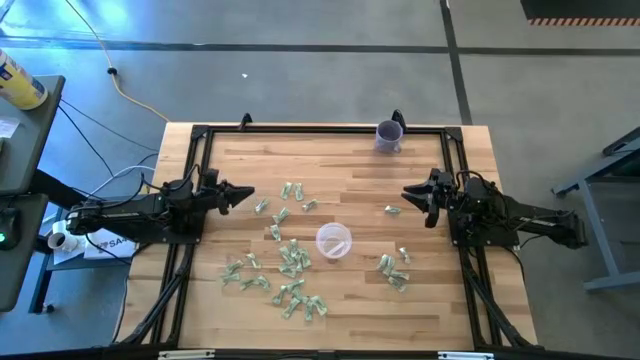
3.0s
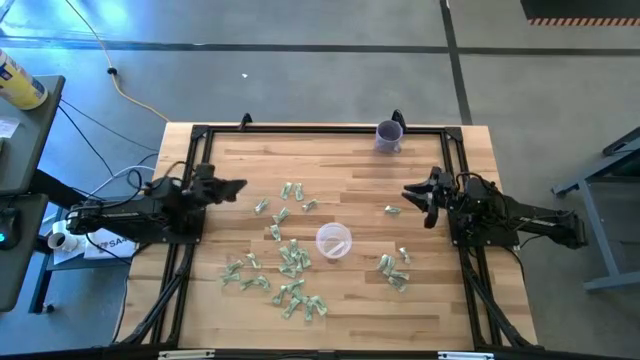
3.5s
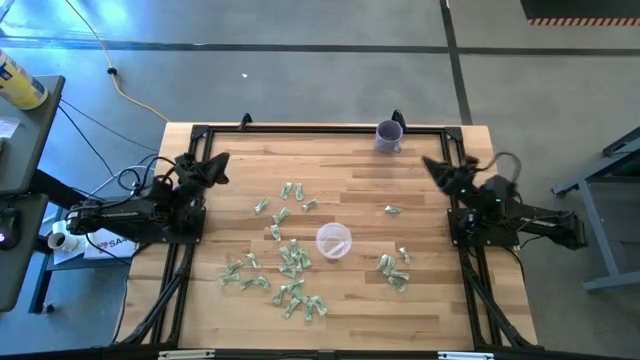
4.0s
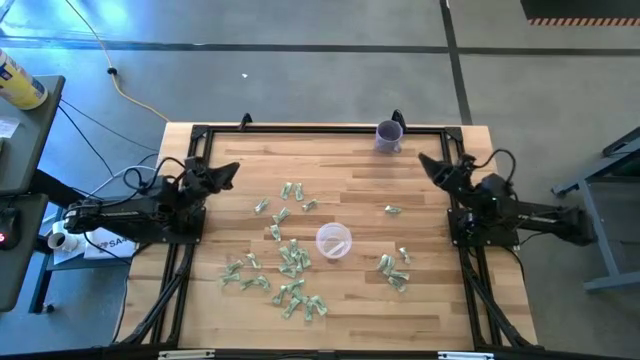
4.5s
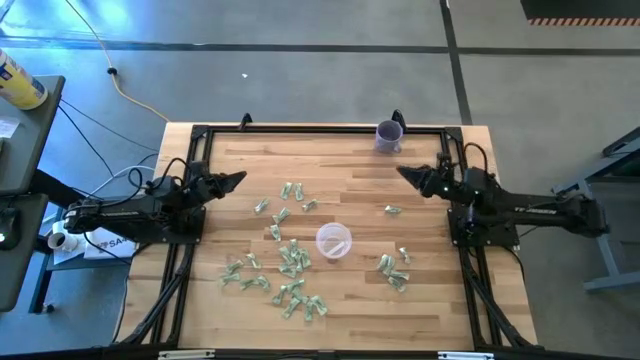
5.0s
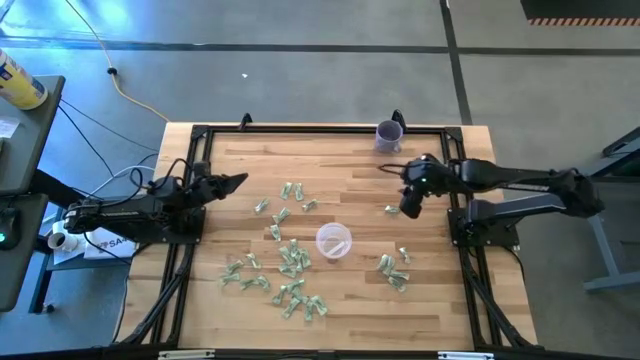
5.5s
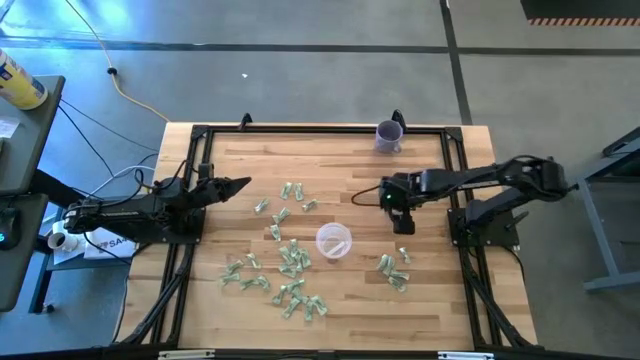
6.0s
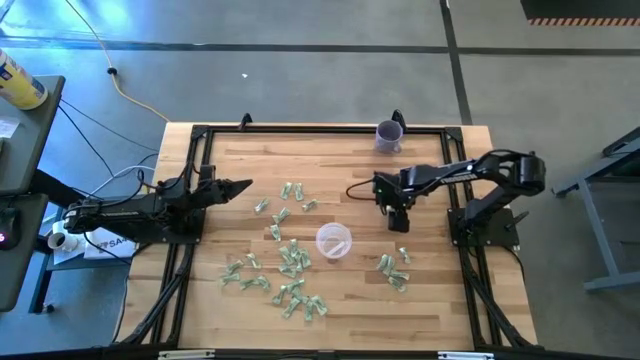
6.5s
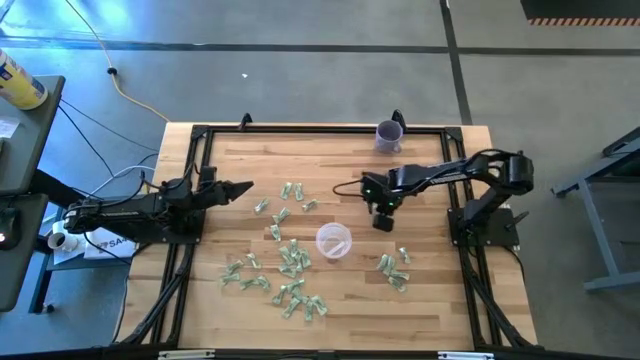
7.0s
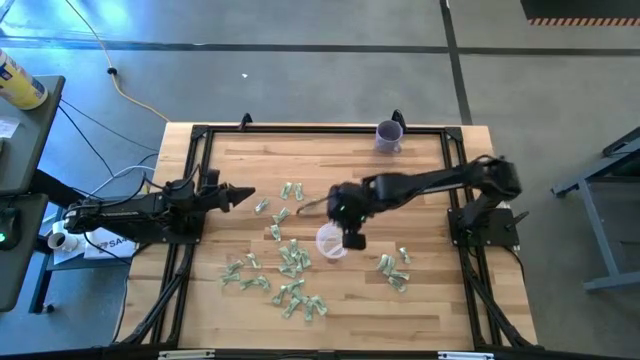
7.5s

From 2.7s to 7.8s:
Task: Pick and place Stevia / Truvia into bins
Put the stevia packet into the bin

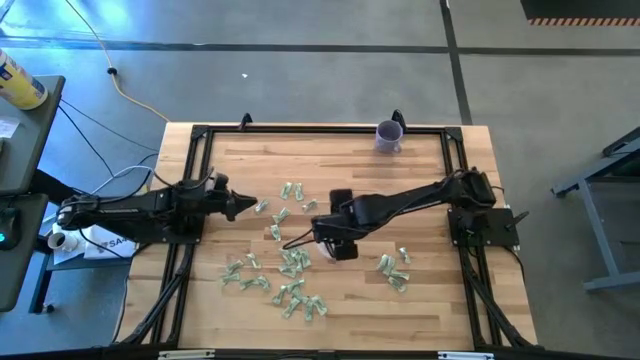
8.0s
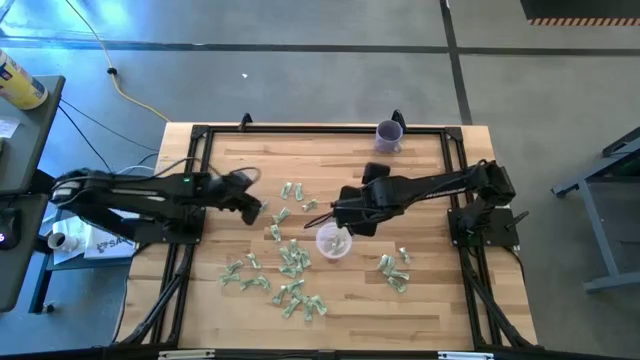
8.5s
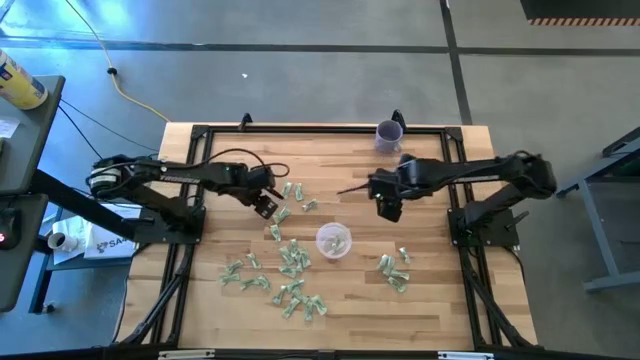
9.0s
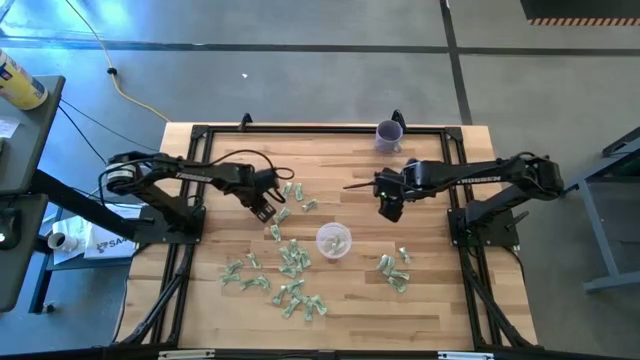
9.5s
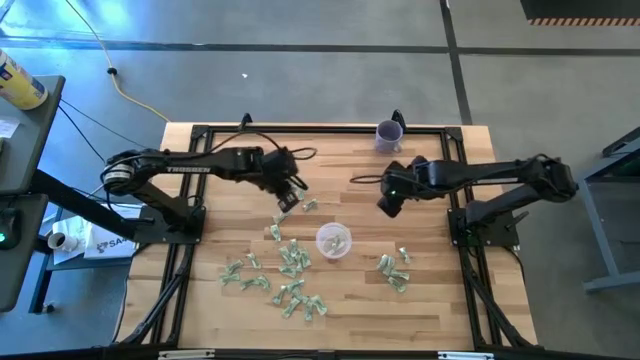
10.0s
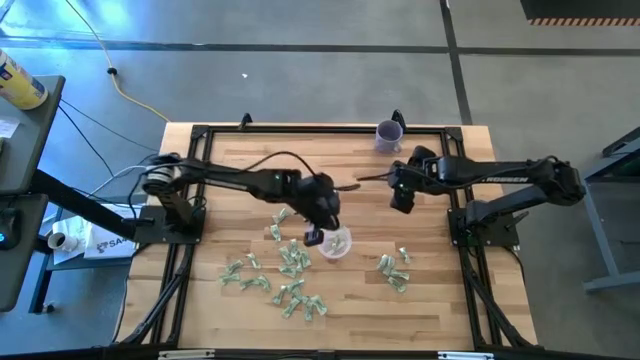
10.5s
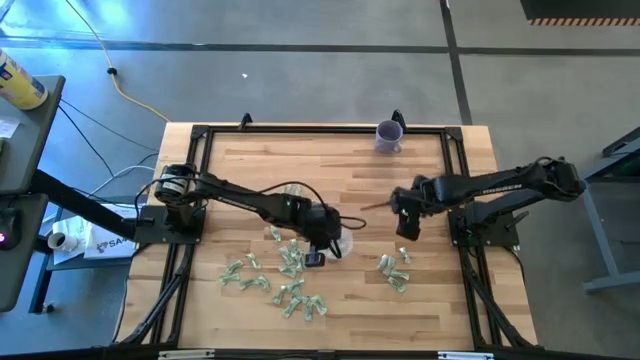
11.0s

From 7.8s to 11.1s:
Put the stevia packet into the bin

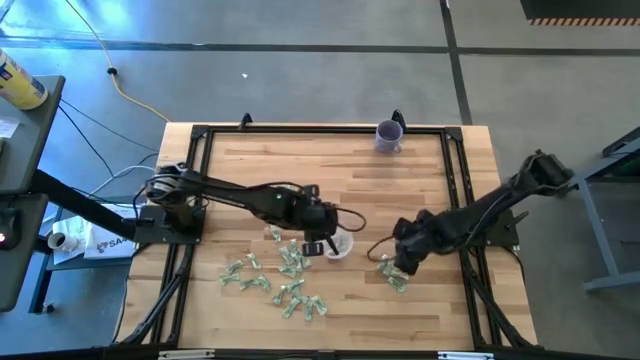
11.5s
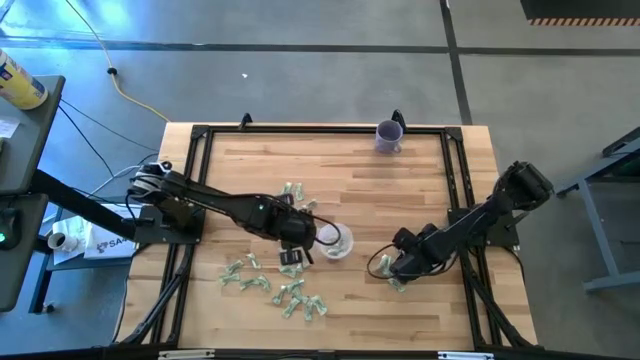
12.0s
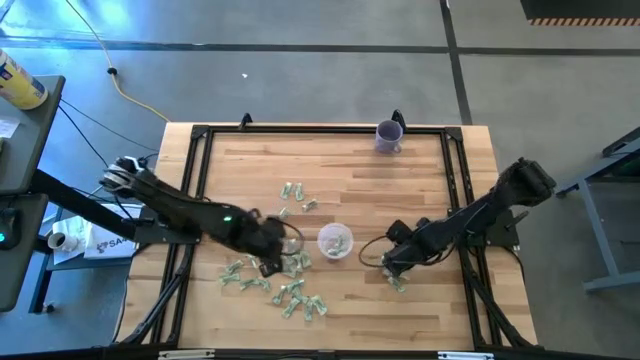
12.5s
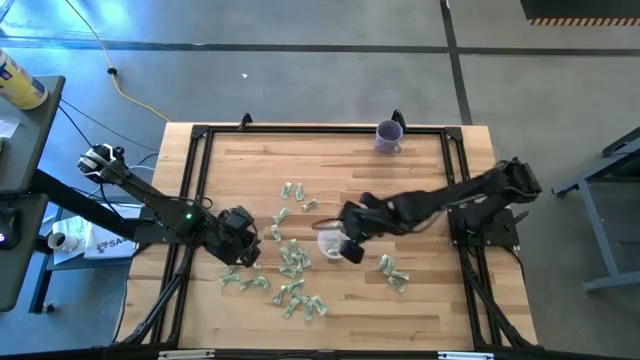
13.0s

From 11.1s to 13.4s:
Put the stevia packet into the bin

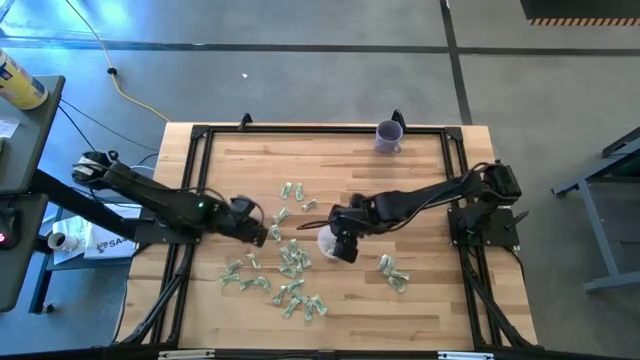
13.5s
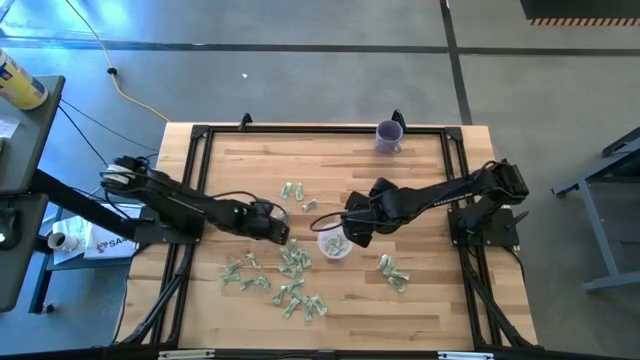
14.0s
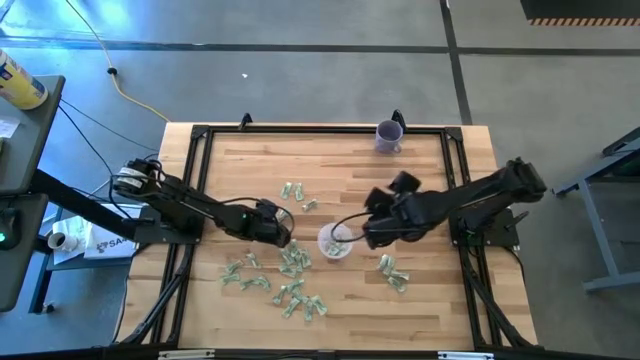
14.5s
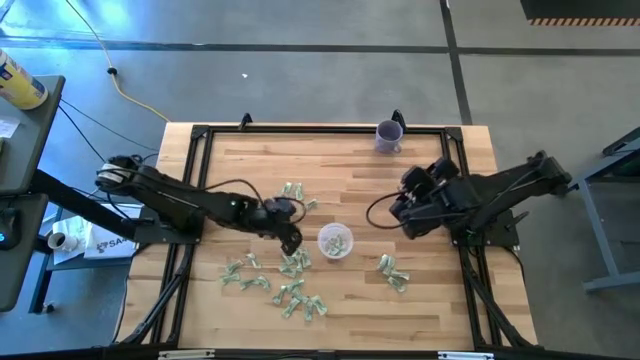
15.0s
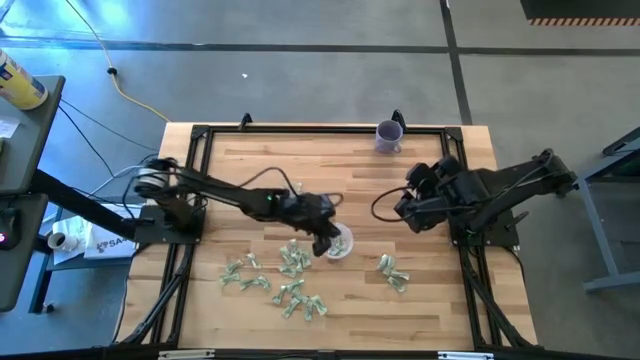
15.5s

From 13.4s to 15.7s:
Put the stevia packet into the bin

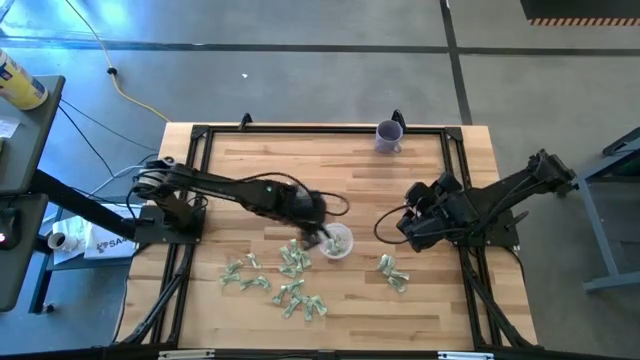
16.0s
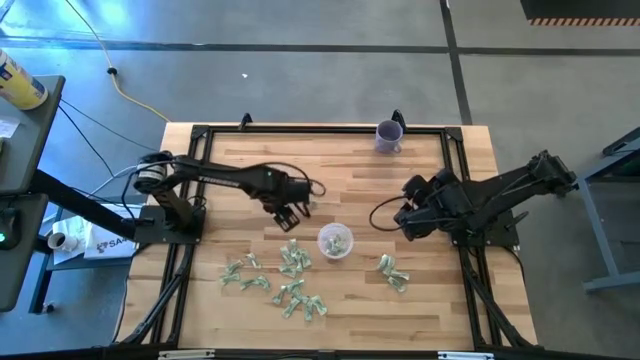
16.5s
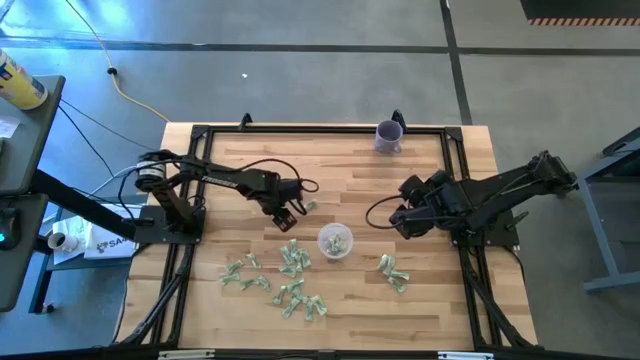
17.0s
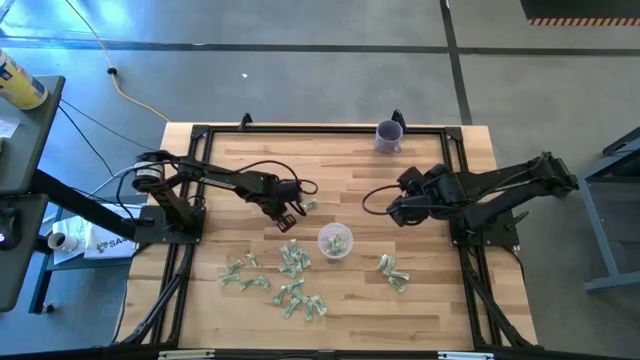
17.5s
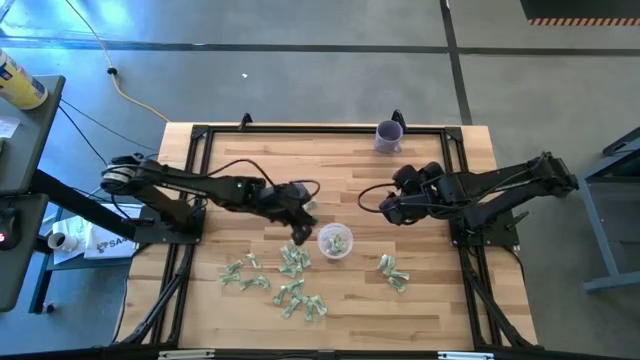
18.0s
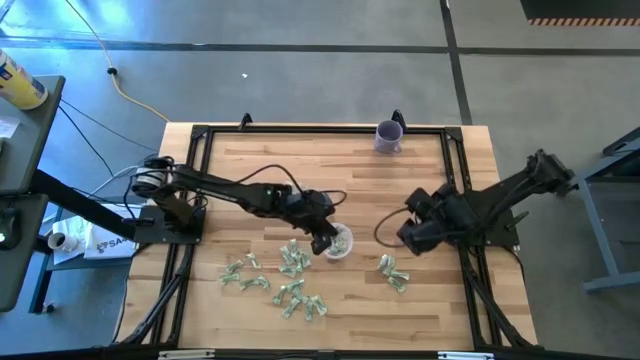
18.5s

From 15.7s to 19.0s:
Put the stevia packet into the bin

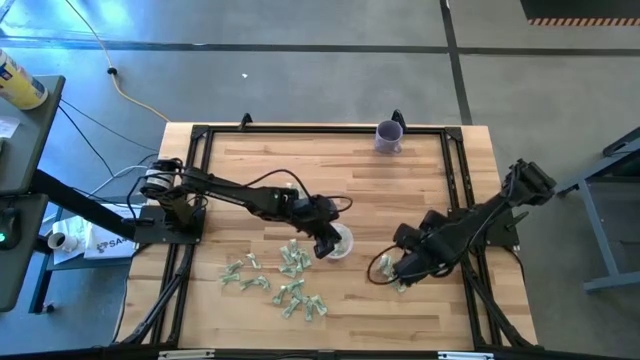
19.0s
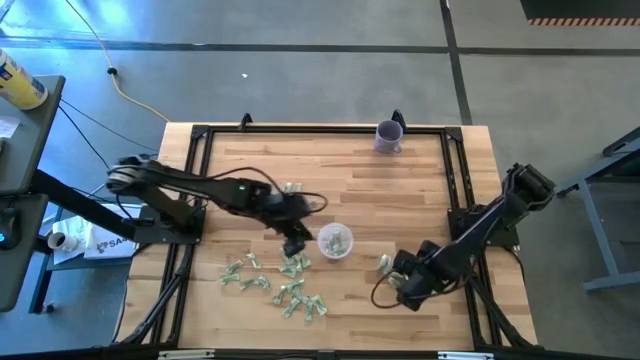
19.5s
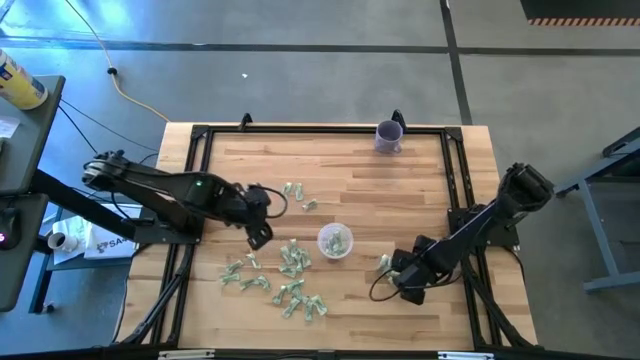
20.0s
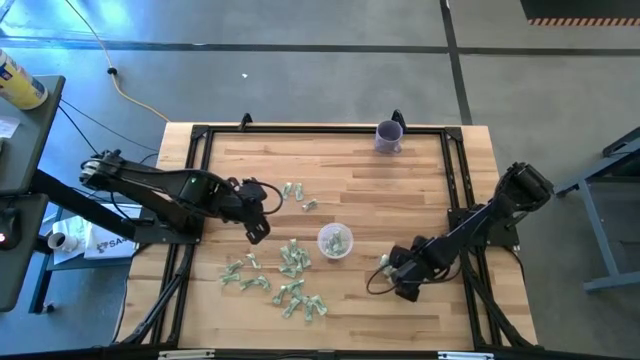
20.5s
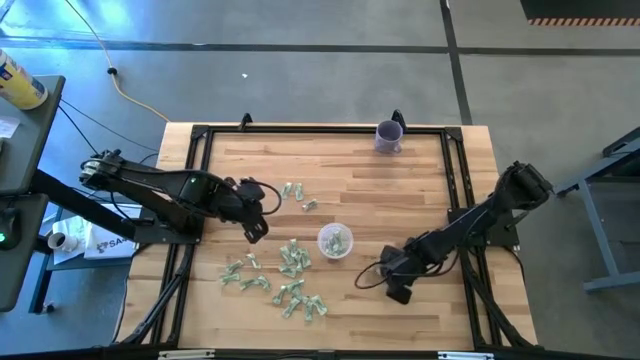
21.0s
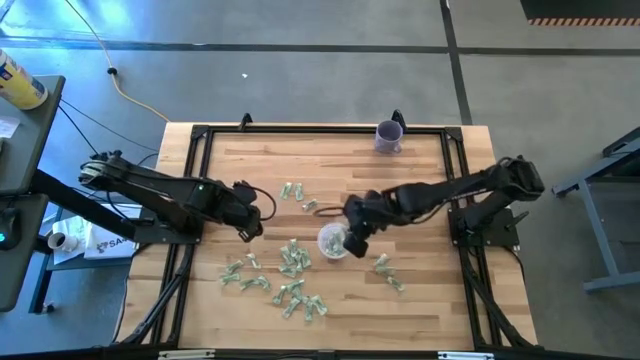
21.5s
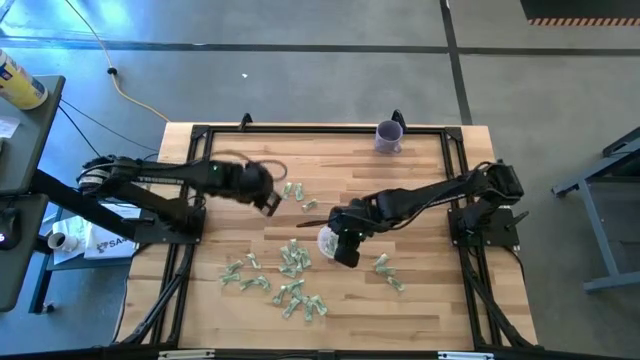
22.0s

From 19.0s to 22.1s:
Put the stevia packet into the bin

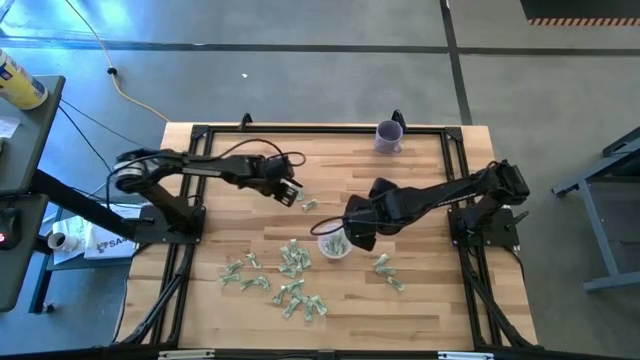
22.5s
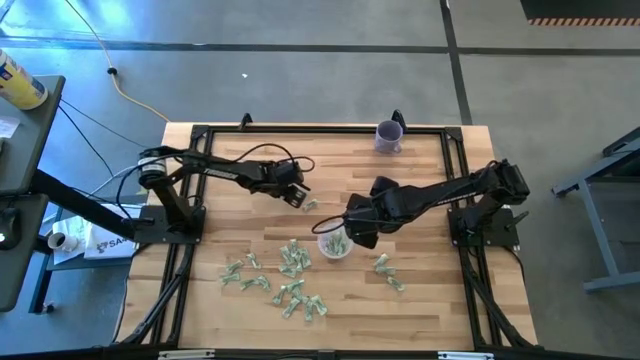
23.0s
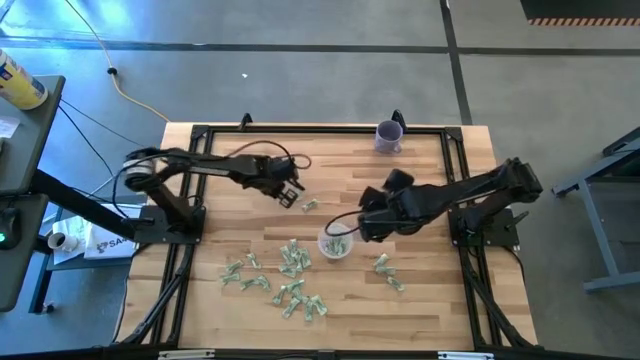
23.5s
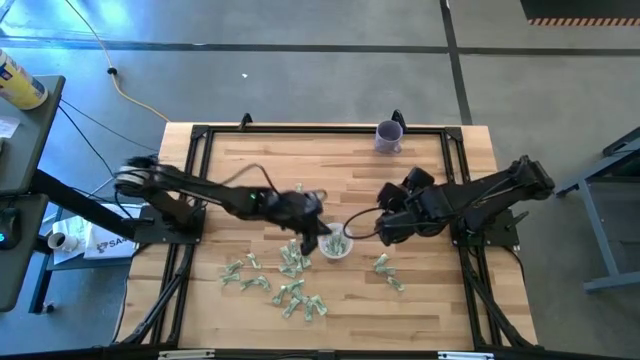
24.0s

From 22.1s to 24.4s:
Put the stevia packet into the bin

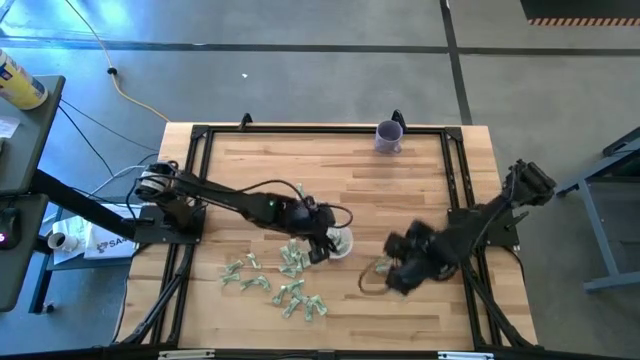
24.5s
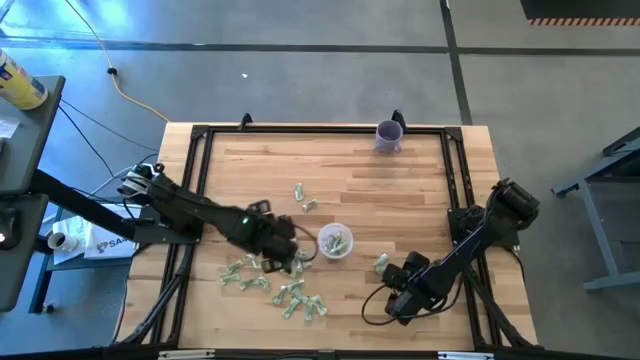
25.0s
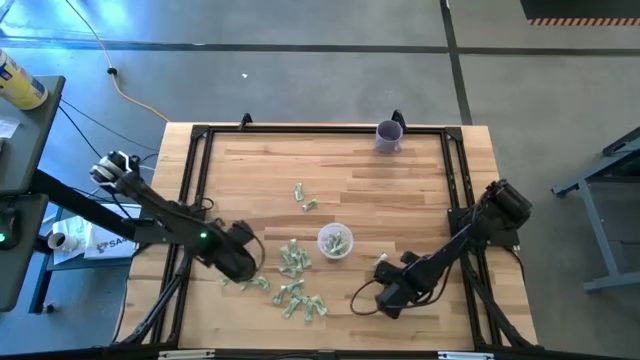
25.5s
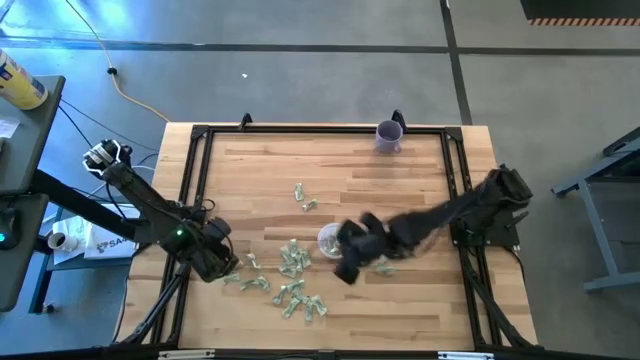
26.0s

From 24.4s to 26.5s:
Put the stevia packet into the bin
